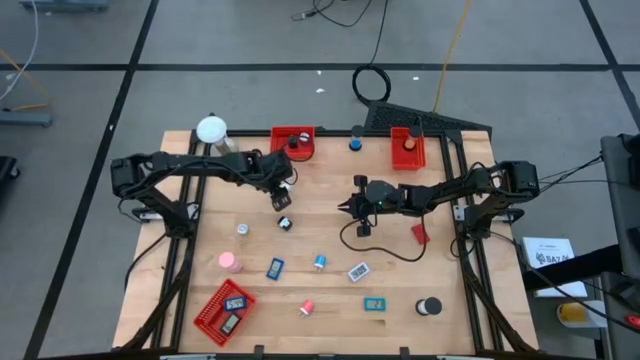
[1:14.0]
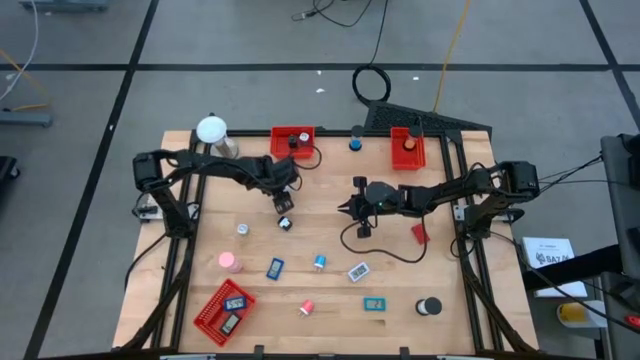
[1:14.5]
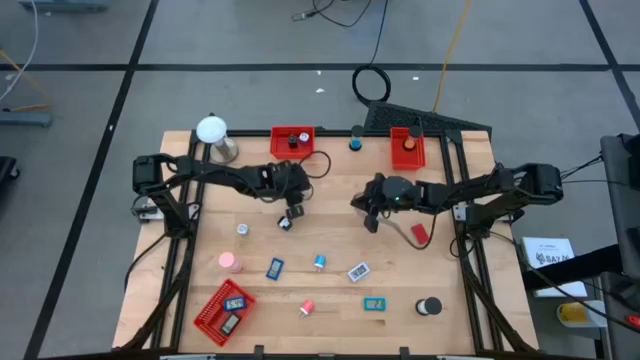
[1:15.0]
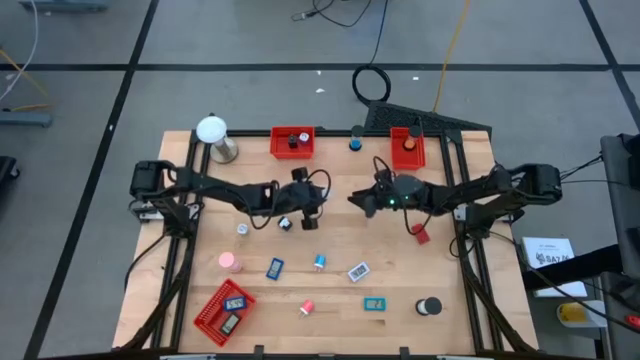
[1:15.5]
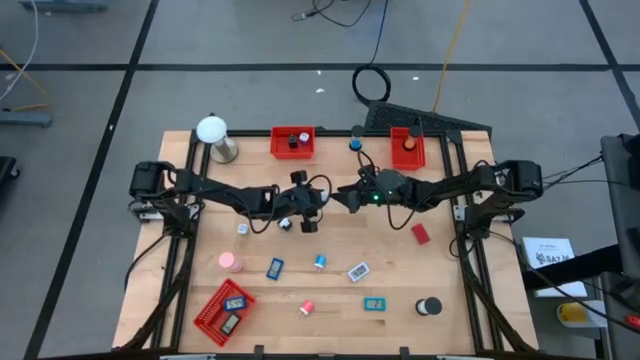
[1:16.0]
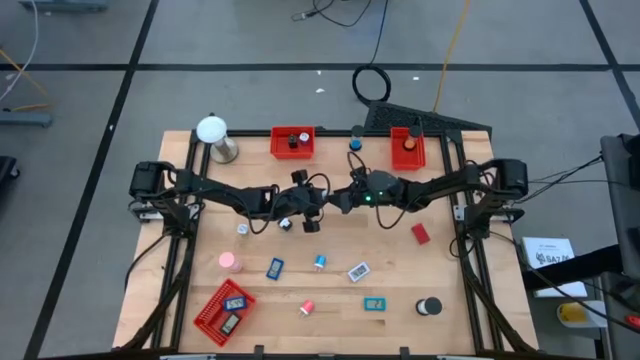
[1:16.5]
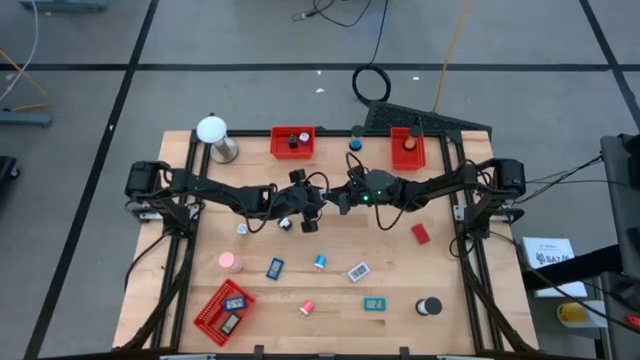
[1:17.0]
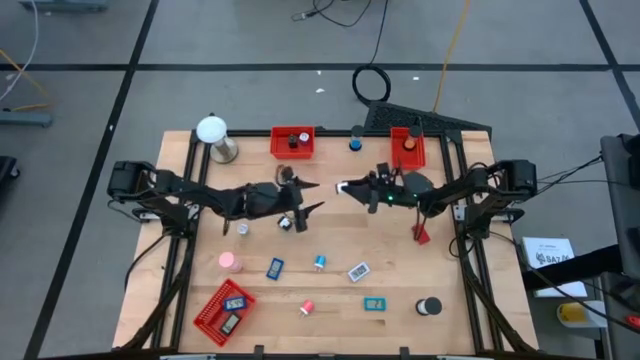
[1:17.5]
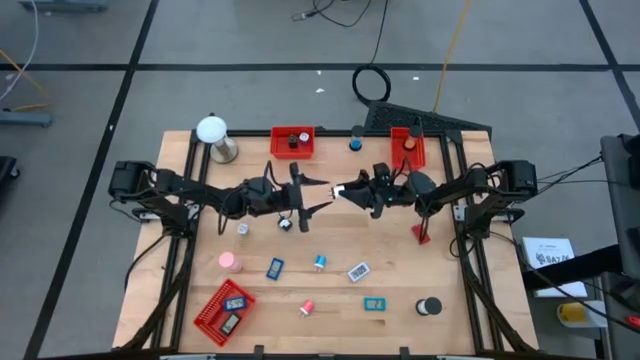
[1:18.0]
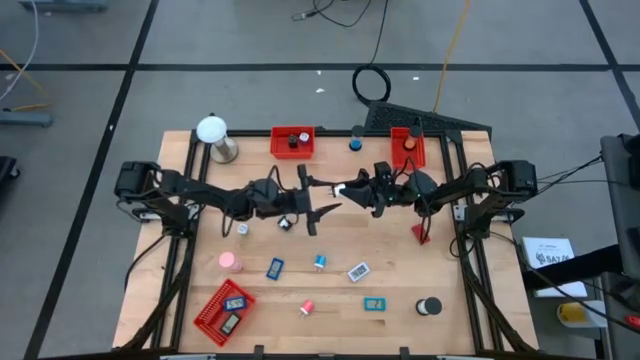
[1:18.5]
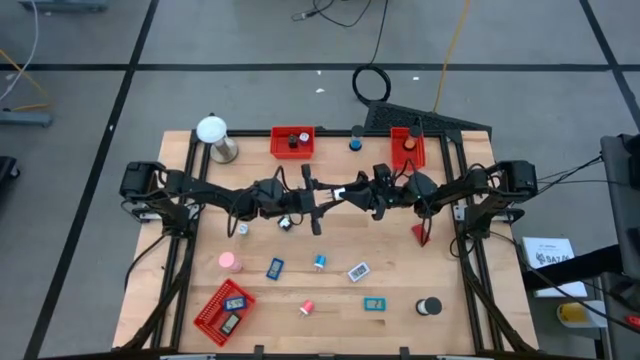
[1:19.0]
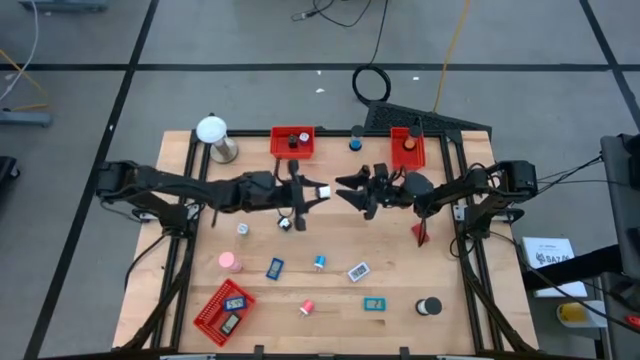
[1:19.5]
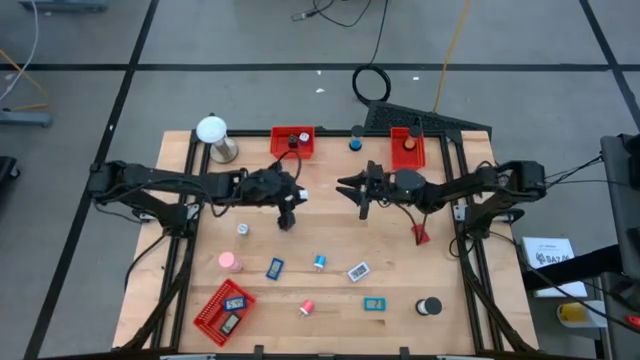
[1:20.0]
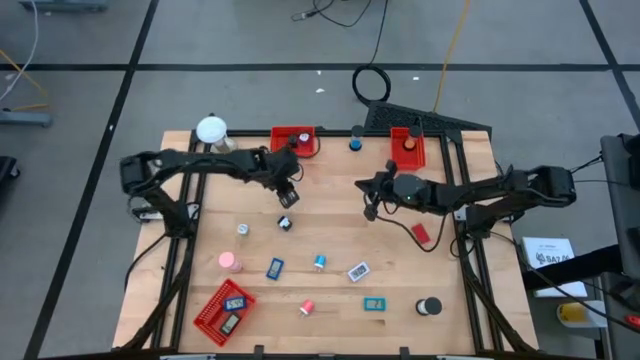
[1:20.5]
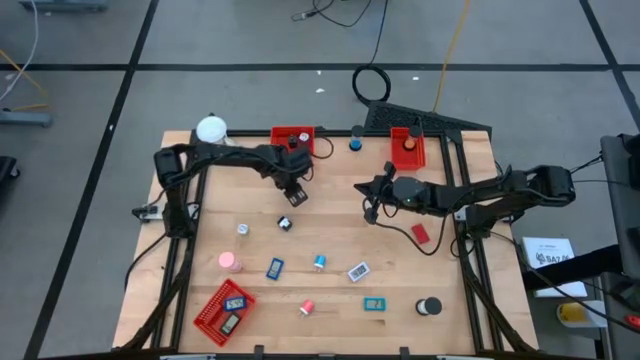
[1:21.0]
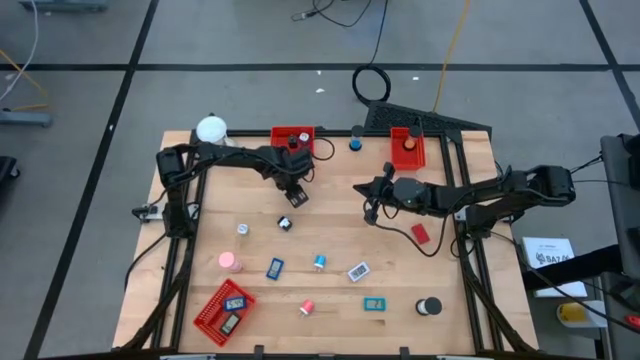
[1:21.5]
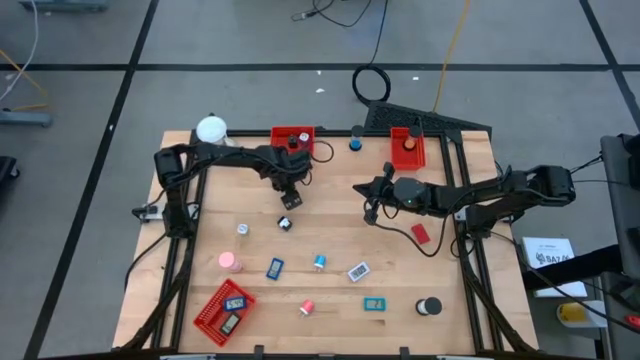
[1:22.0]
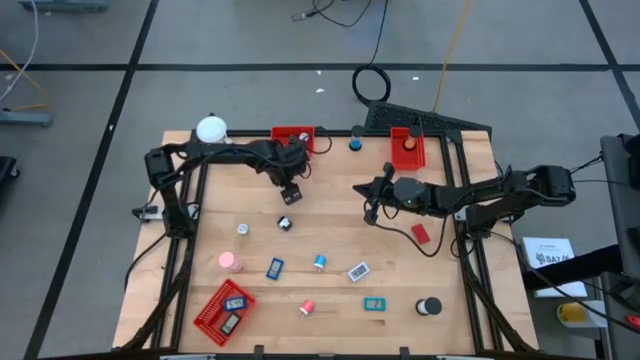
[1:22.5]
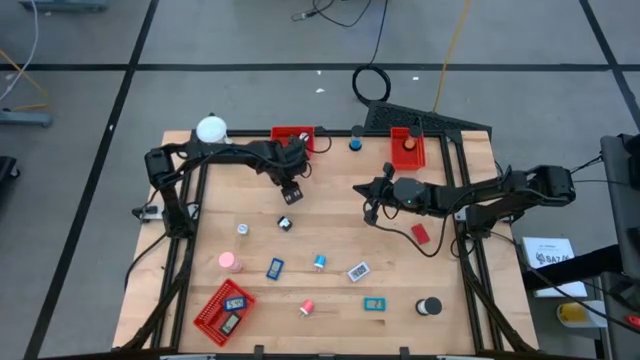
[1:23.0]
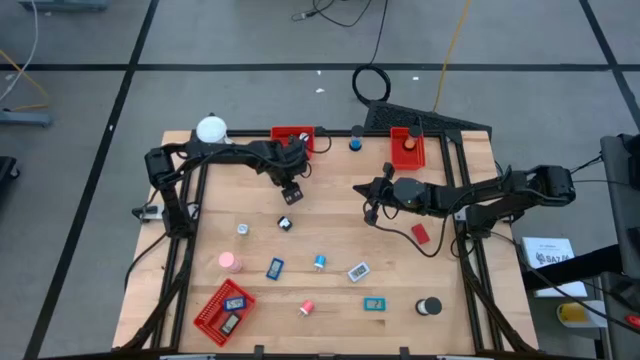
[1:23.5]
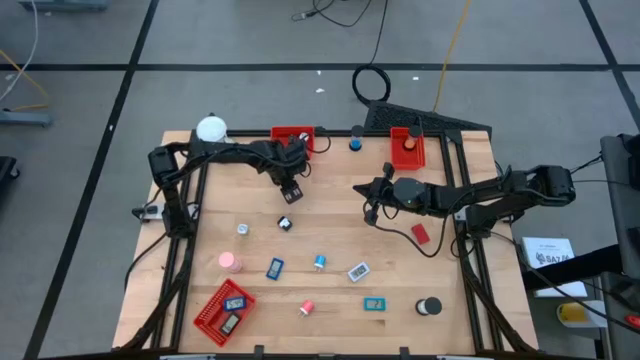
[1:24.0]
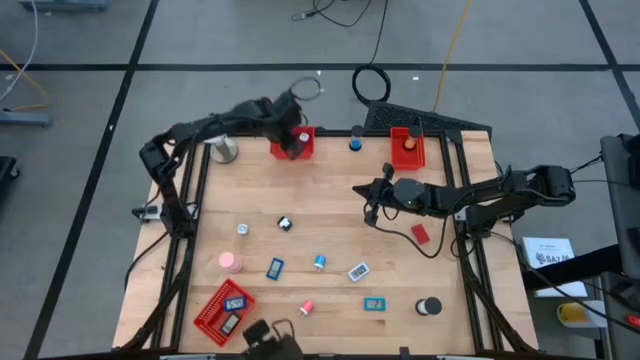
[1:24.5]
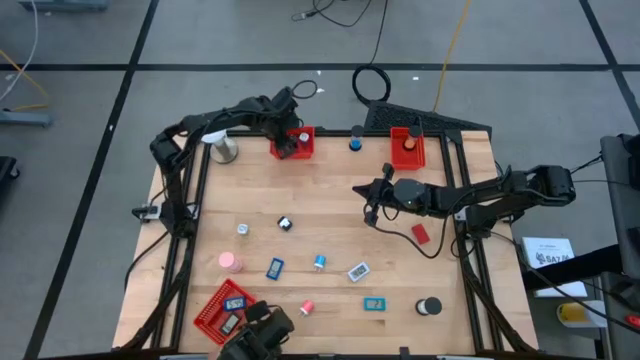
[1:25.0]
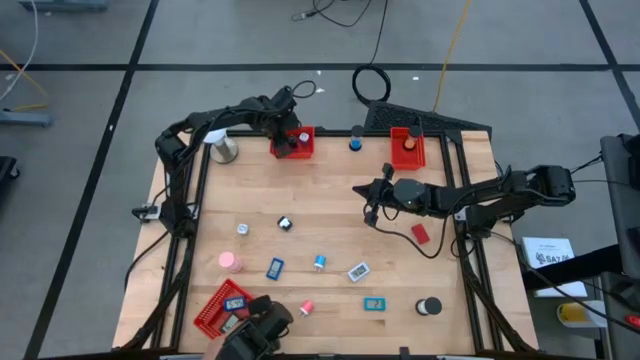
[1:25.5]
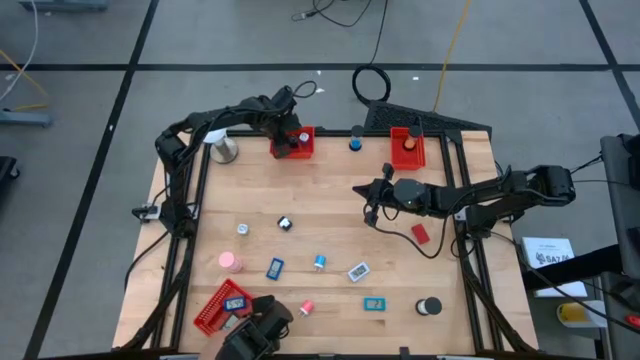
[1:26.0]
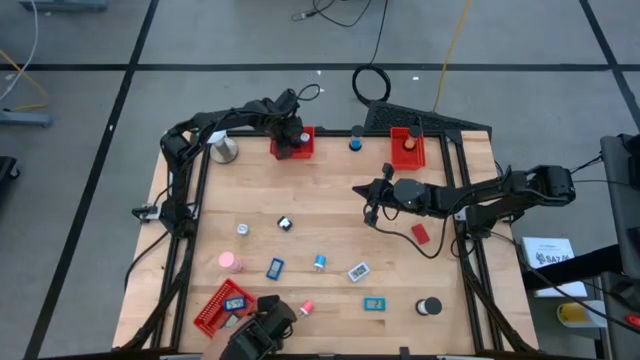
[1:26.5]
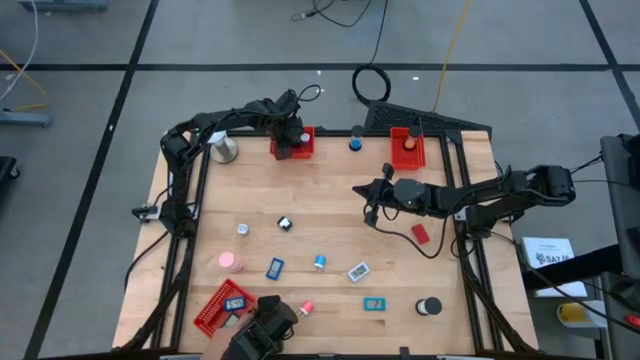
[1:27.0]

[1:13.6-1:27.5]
Task: Pick & Place Office items
Put the white charger adapter into the top left red basket

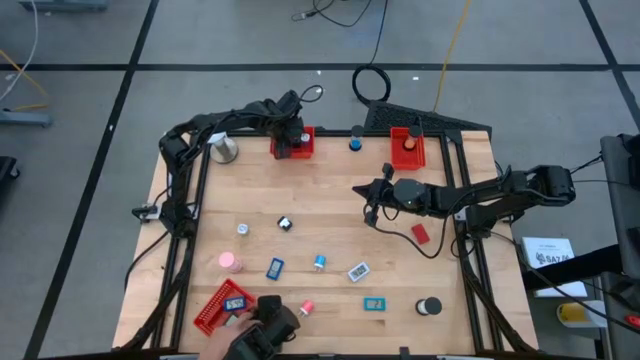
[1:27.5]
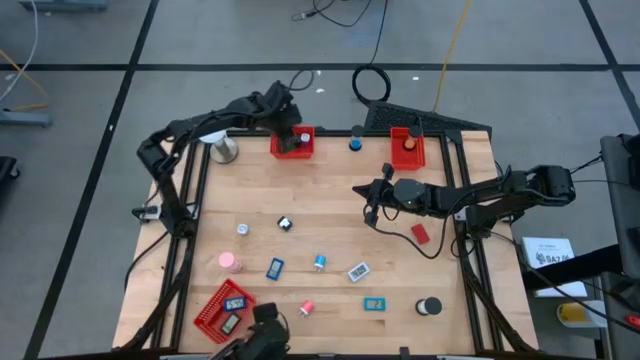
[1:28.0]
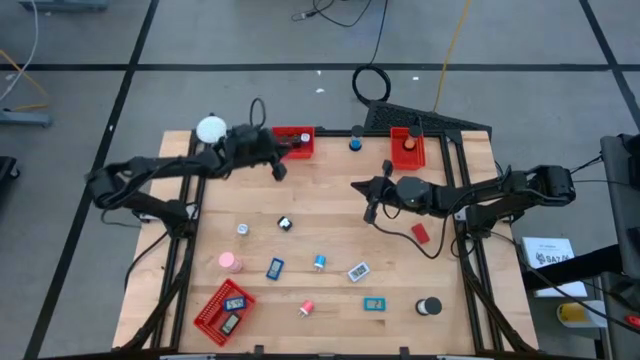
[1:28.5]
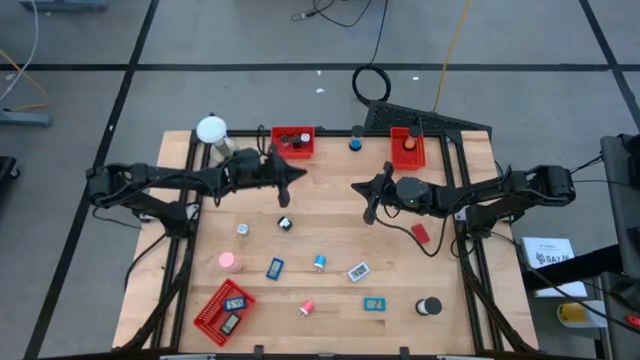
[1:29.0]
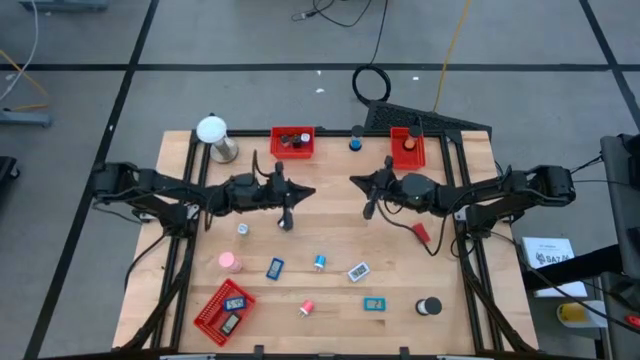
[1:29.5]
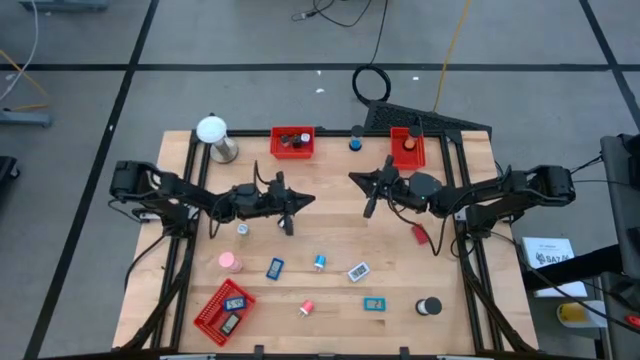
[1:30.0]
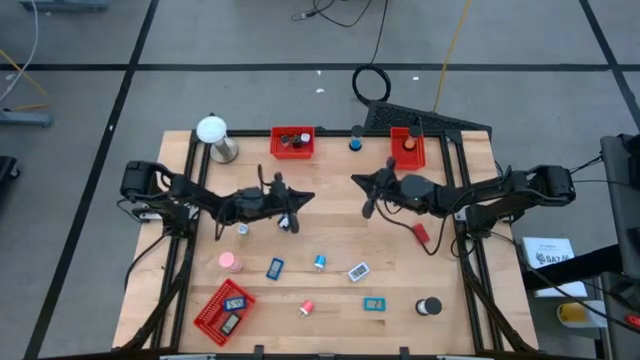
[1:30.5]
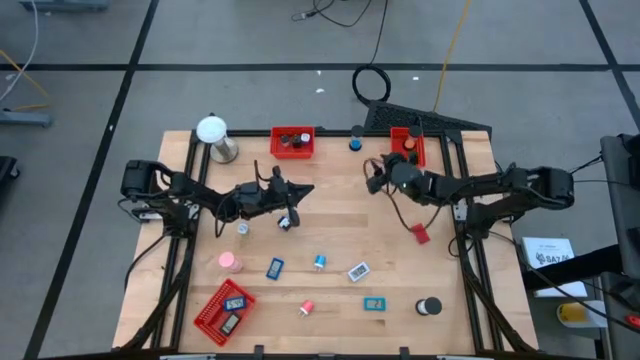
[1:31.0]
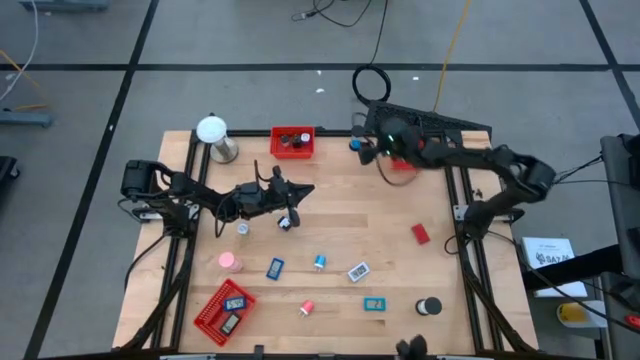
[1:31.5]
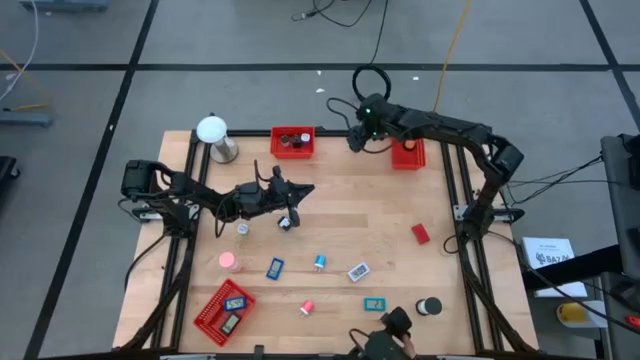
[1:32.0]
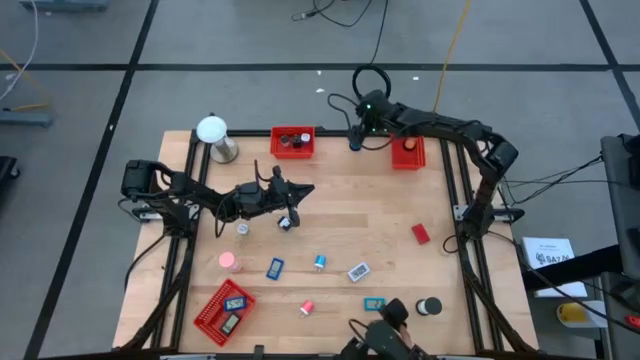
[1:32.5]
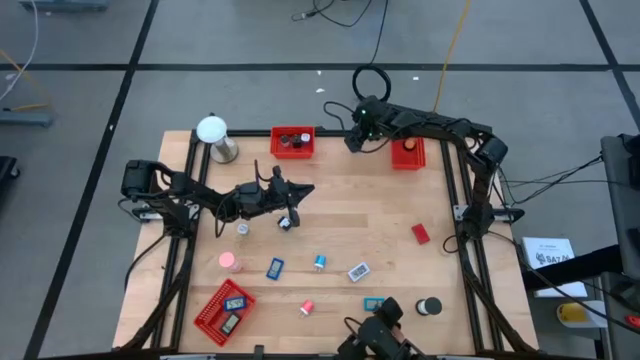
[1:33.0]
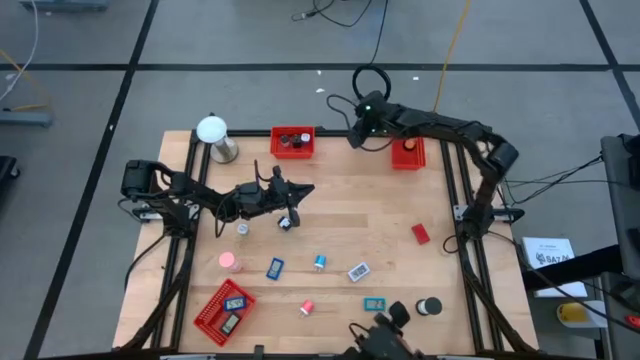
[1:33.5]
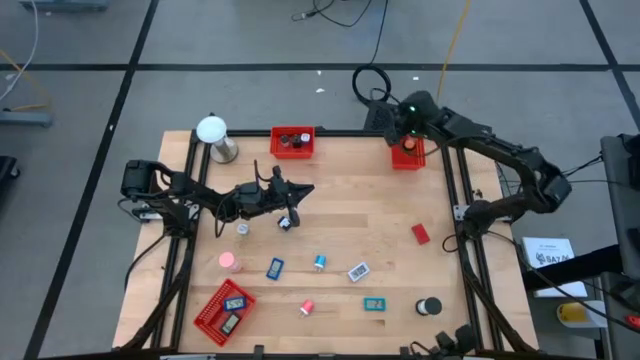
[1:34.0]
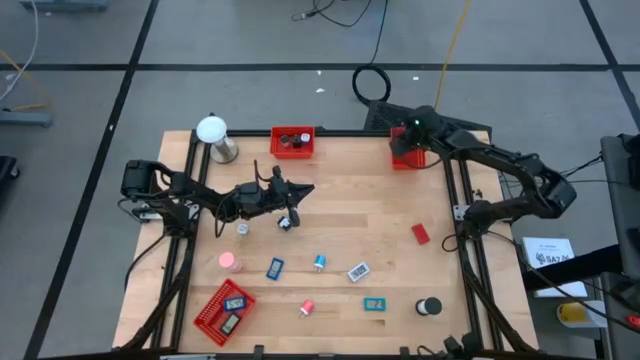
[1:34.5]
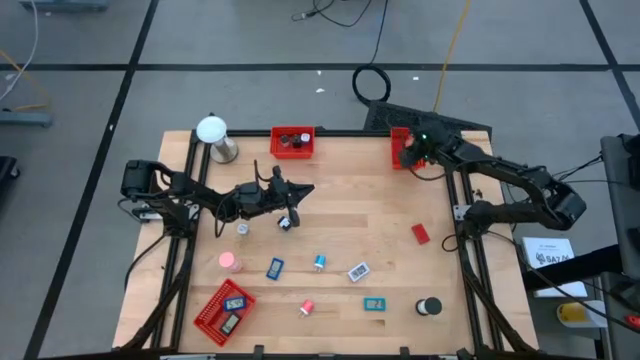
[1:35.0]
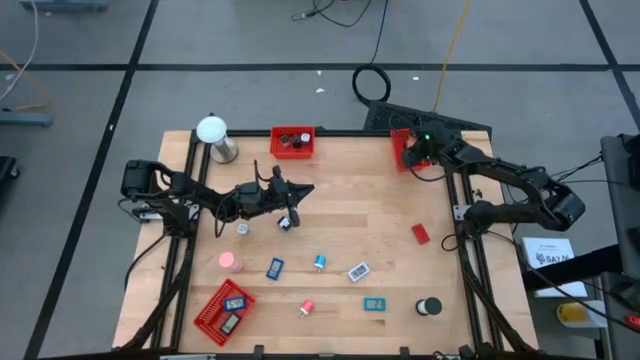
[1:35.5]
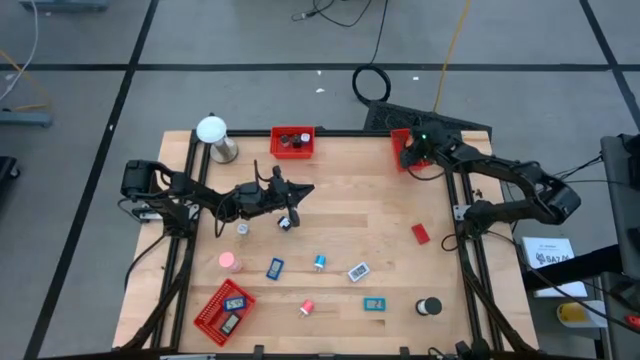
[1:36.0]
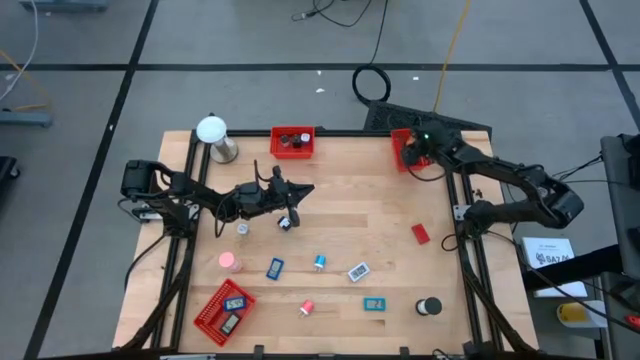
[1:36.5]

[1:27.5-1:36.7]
Put the blue hourglass into the top right red basket
